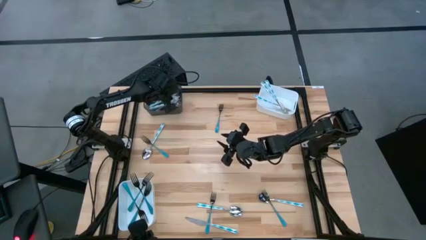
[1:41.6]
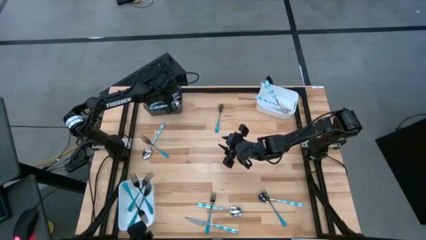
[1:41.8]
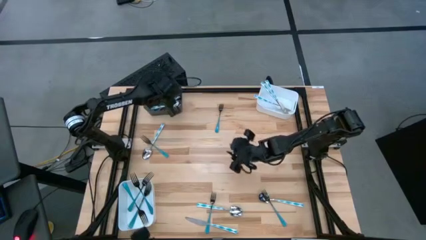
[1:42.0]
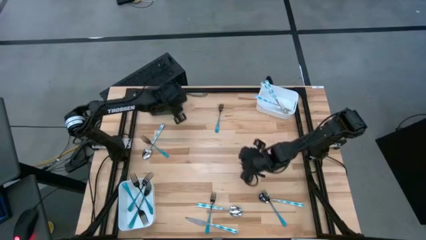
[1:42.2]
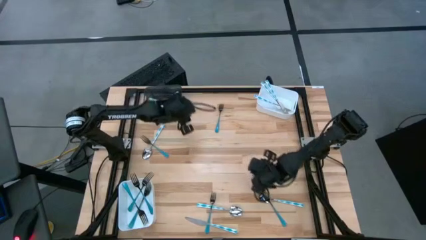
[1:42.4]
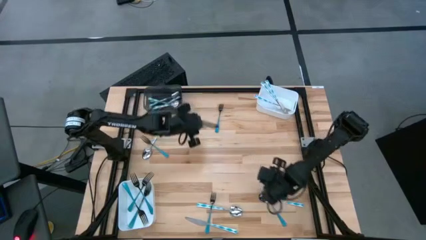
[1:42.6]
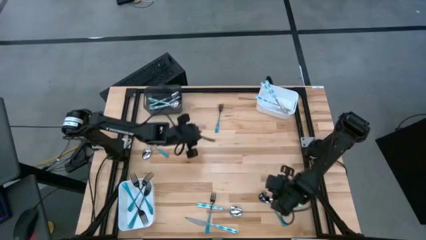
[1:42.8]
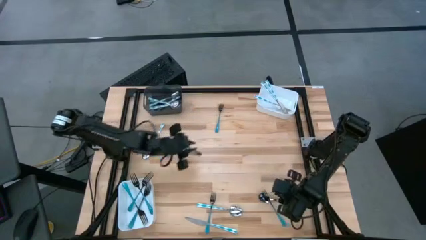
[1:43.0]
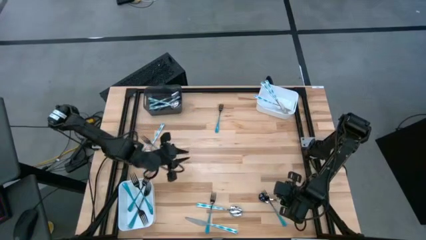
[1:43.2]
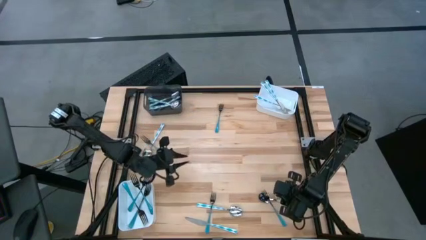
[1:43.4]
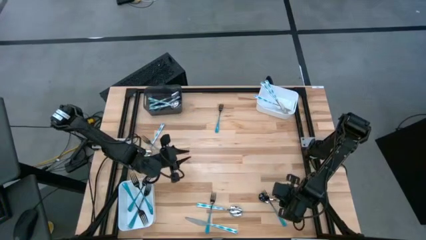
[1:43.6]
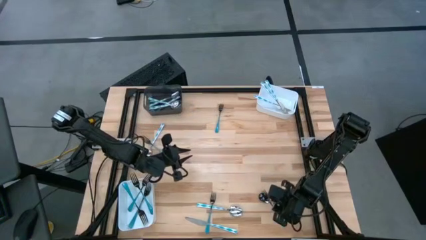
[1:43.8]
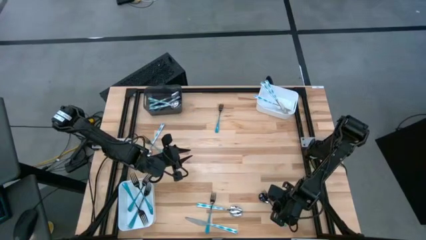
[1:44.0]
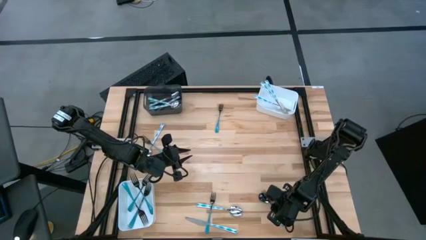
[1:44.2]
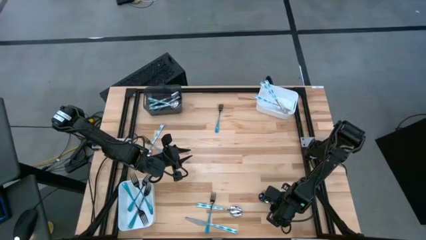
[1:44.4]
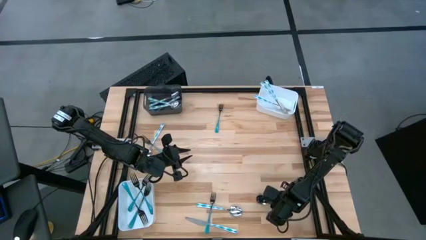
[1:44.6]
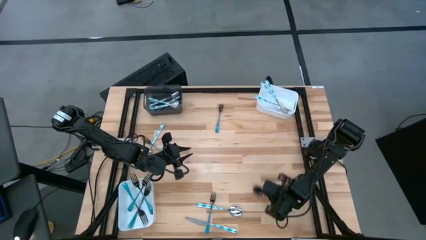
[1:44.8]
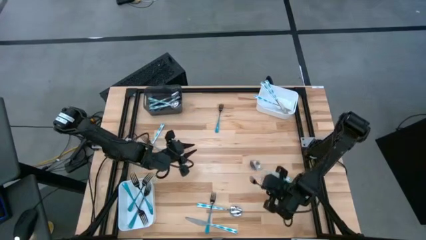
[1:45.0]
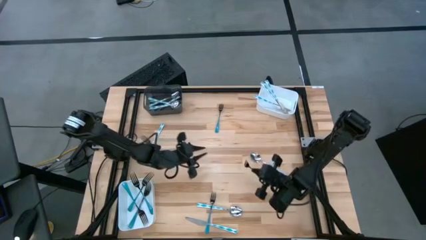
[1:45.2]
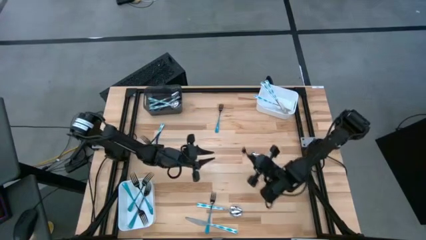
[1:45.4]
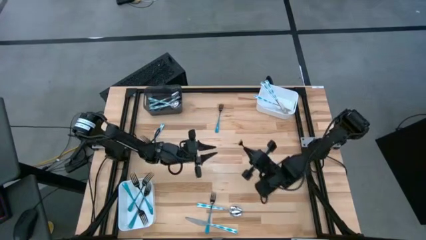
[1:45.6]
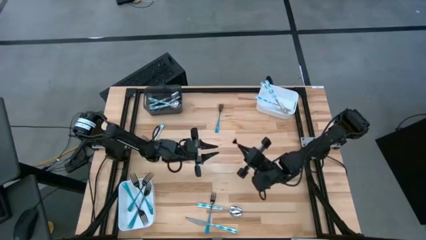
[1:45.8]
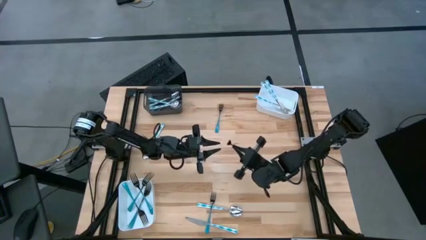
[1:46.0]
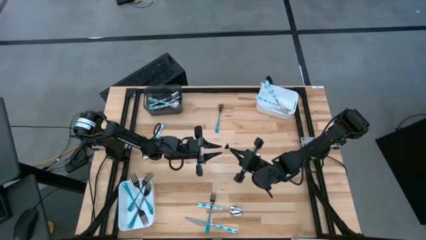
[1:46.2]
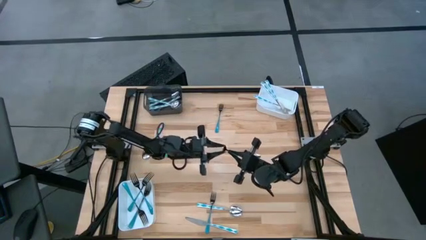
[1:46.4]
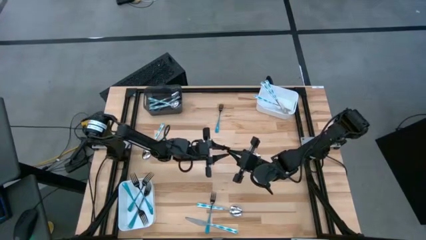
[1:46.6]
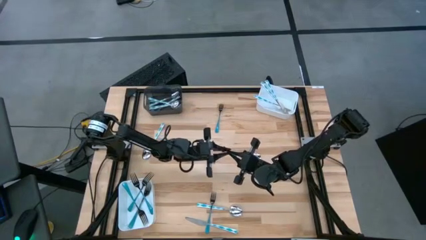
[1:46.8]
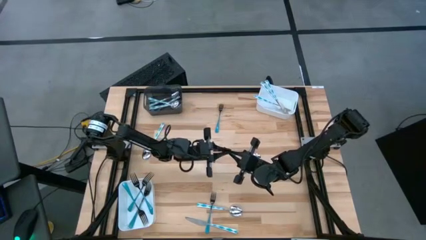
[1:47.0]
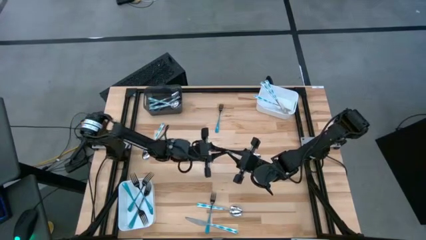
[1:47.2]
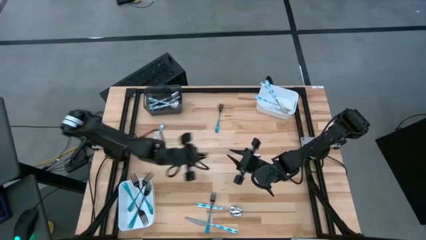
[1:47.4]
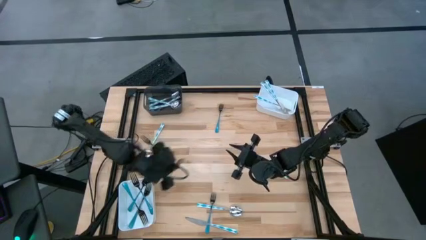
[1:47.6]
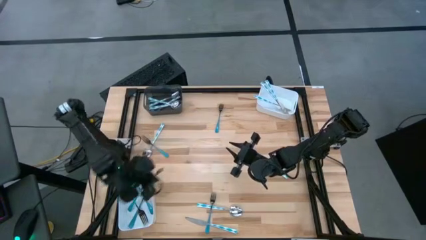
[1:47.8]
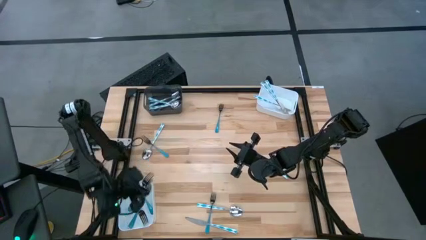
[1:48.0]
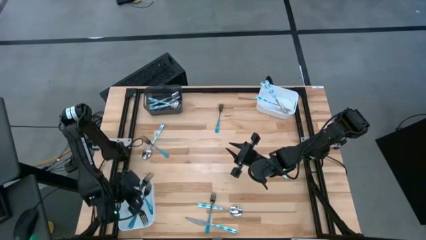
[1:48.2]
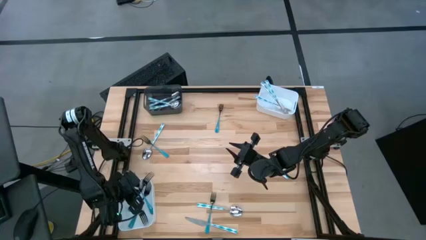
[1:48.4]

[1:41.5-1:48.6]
Task: Sort silverware by color (type)
Put the blue fork into the bottom white bin

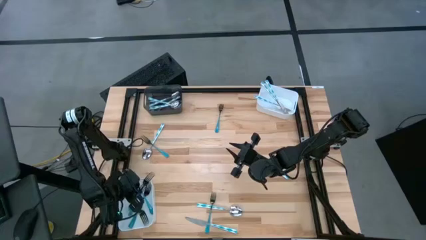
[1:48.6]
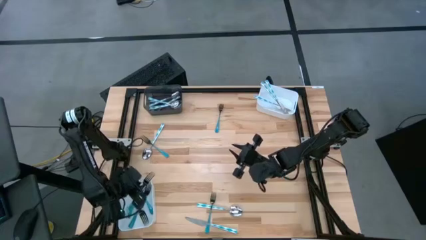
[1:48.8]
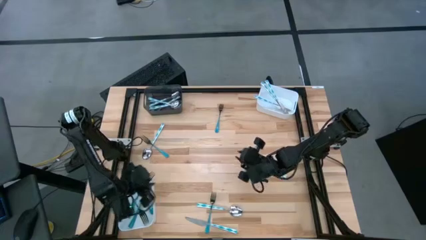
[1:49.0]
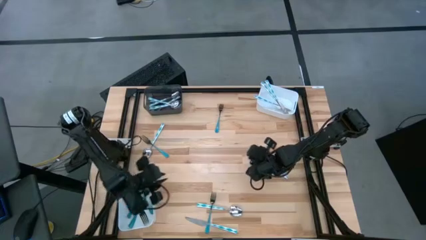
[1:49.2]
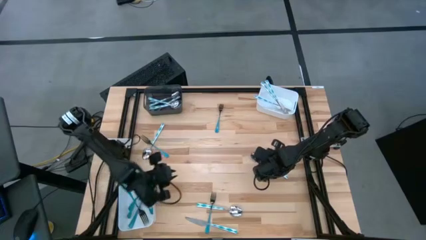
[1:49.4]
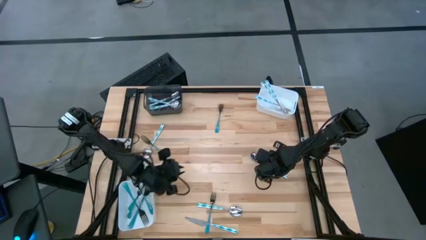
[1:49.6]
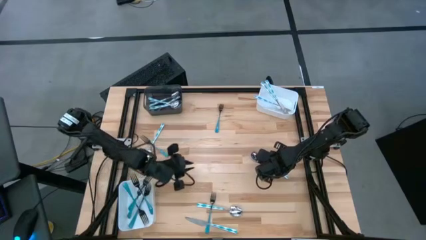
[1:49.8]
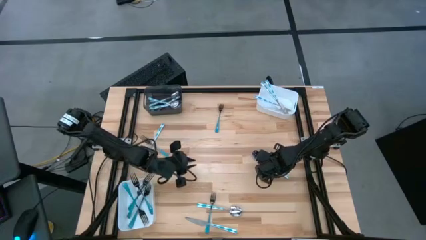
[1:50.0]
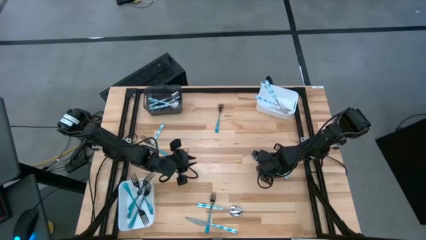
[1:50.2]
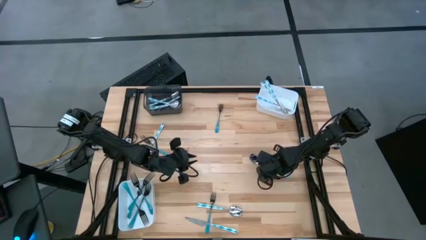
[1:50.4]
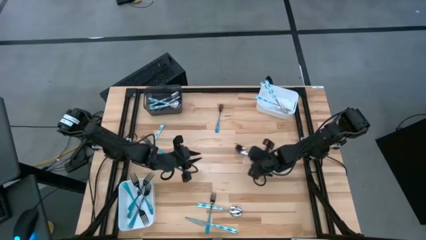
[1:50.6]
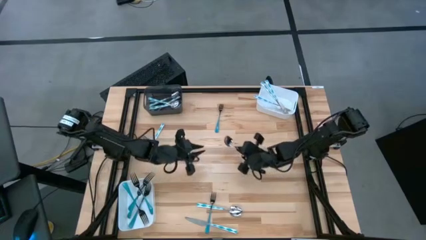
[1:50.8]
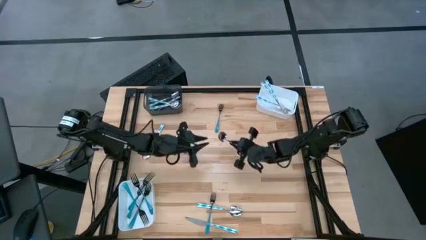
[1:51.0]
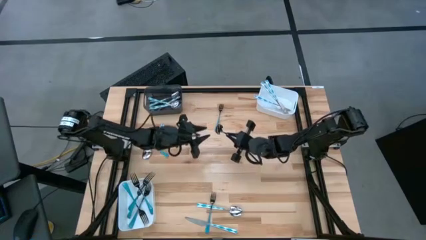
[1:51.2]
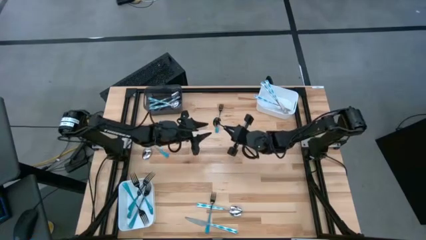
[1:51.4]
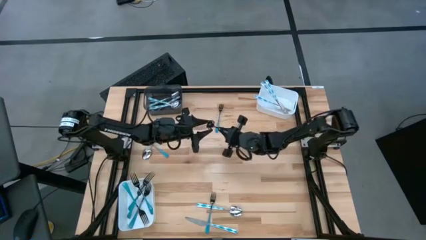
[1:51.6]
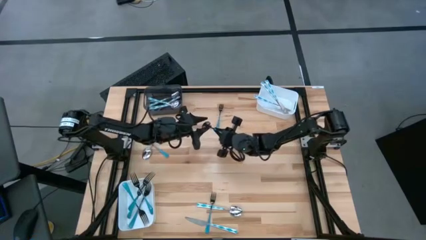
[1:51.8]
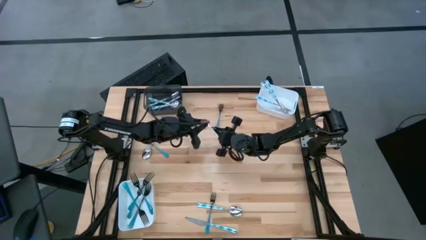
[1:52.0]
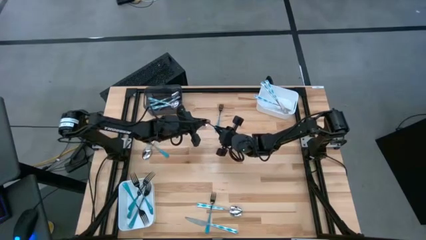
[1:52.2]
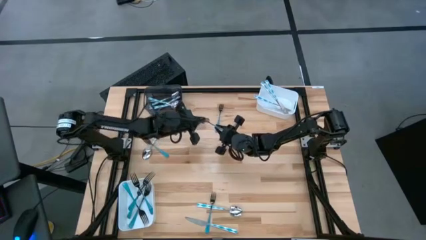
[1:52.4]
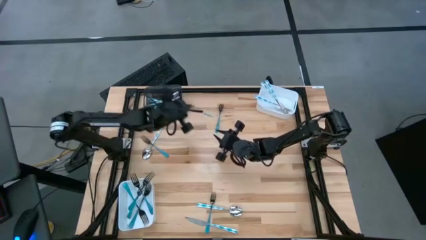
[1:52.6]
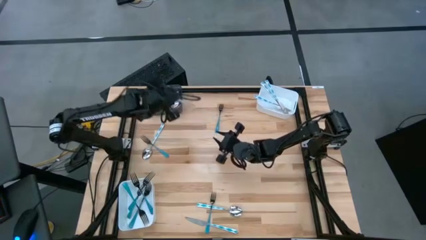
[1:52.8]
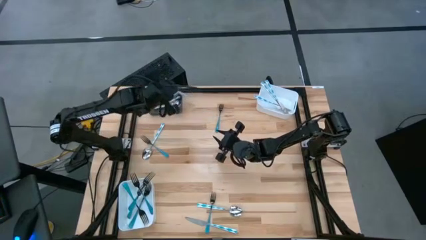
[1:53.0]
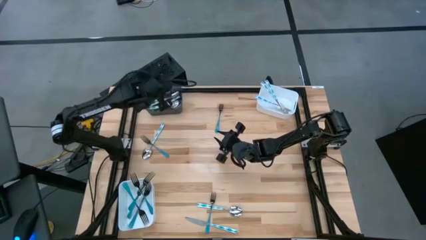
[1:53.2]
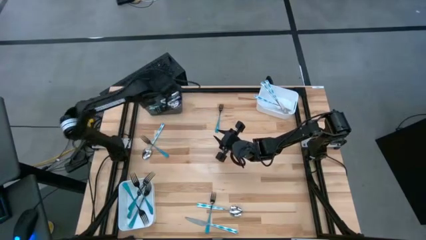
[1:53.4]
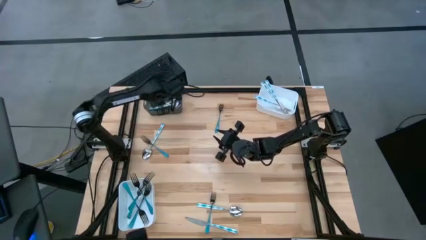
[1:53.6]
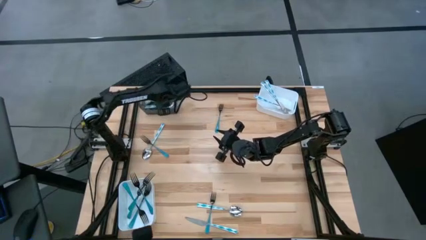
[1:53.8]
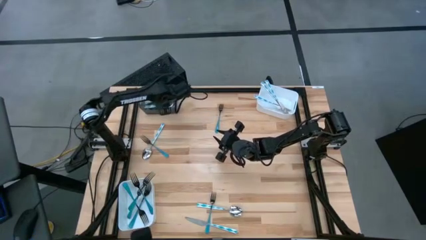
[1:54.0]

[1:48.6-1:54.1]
Put the blue patterned spoon into the black bin

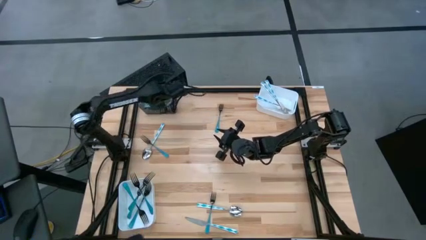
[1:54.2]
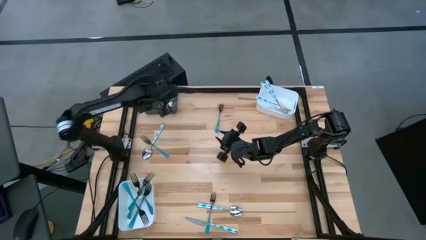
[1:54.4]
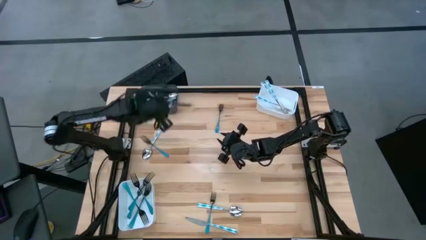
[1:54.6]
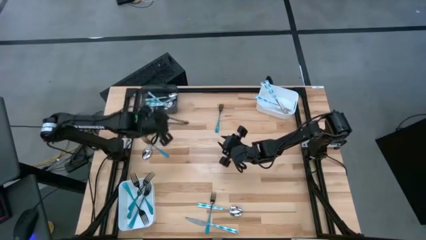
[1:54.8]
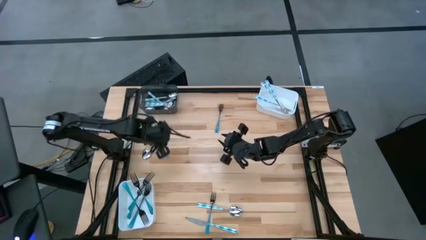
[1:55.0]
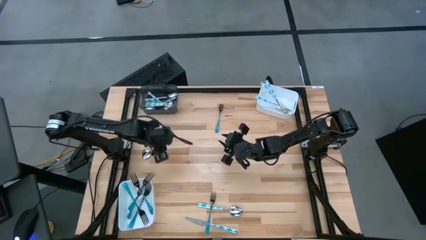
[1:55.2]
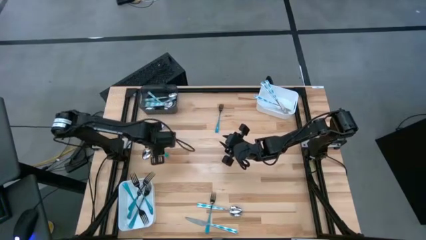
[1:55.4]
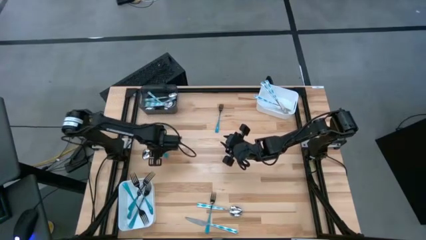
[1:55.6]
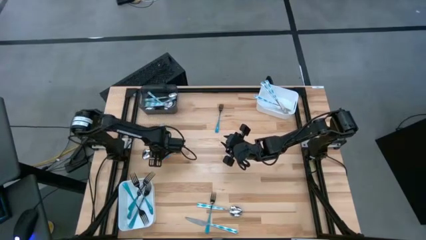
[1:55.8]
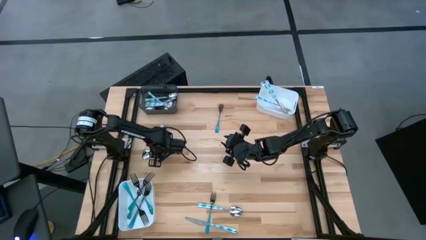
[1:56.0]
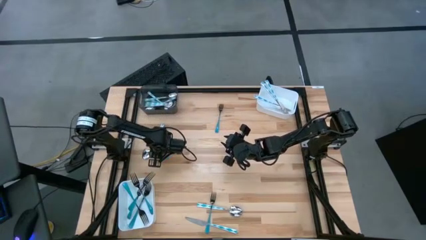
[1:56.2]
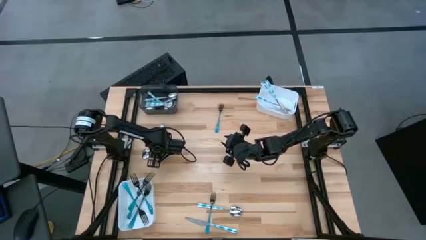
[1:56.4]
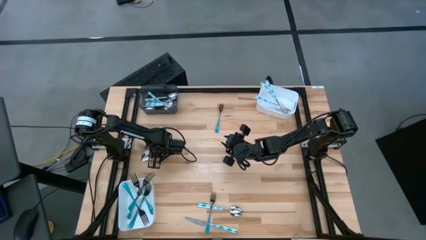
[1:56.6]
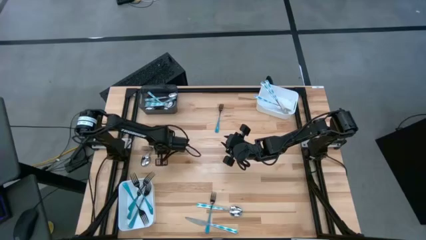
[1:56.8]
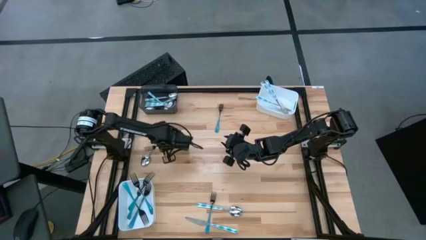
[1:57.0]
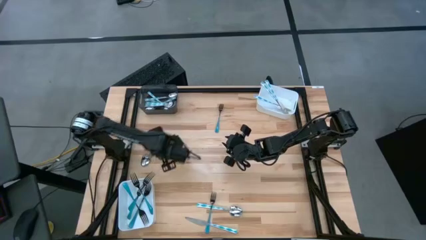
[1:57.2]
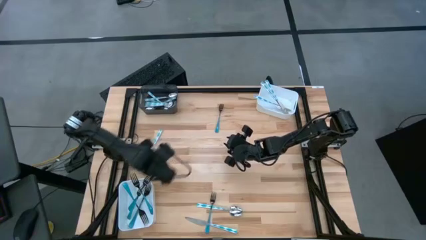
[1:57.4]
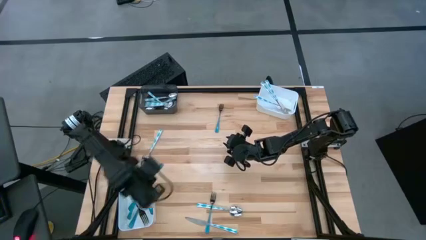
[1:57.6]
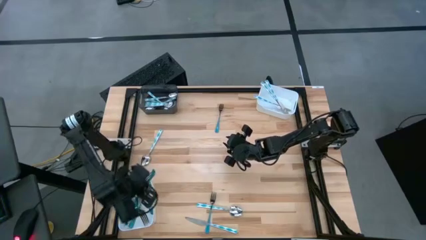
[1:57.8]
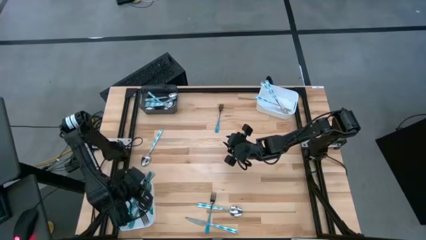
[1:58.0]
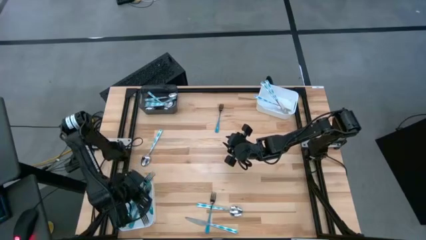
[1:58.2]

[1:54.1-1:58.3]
Put the blue fork into the bottom white bin
